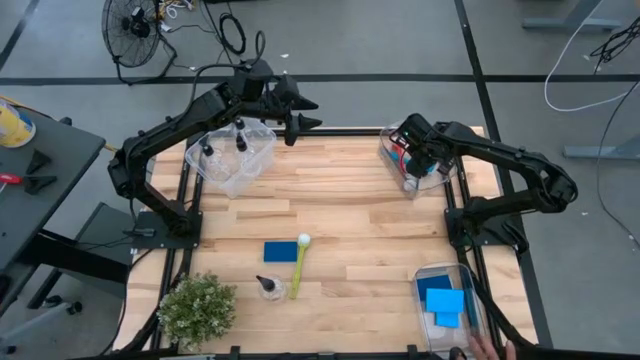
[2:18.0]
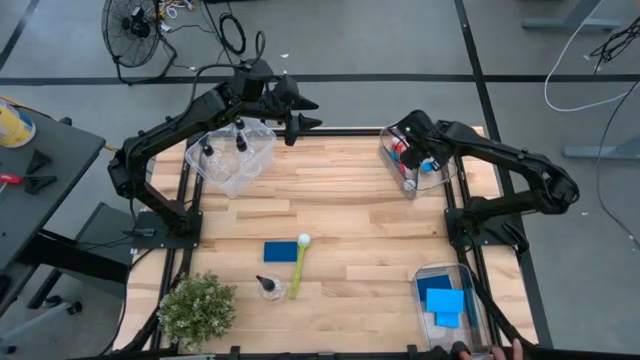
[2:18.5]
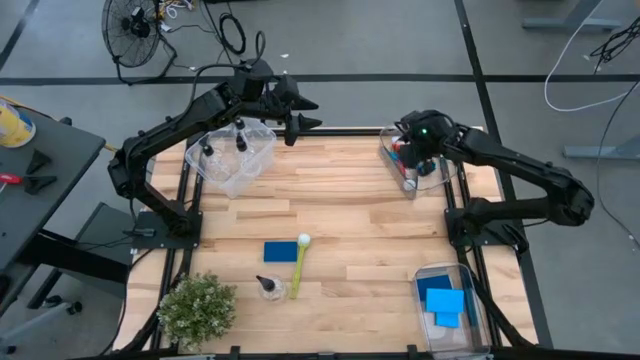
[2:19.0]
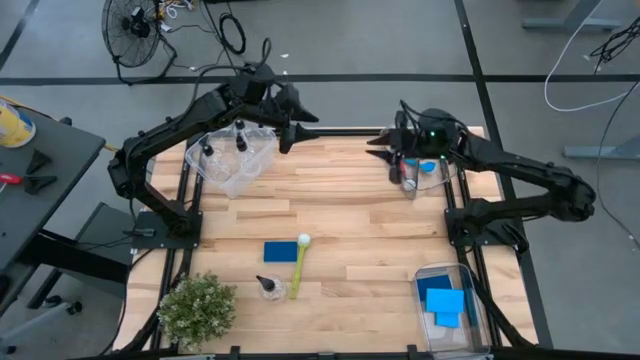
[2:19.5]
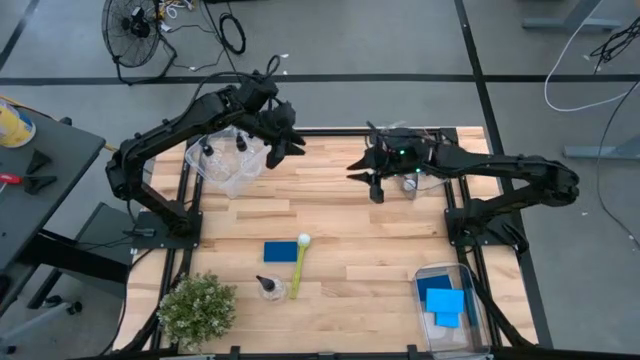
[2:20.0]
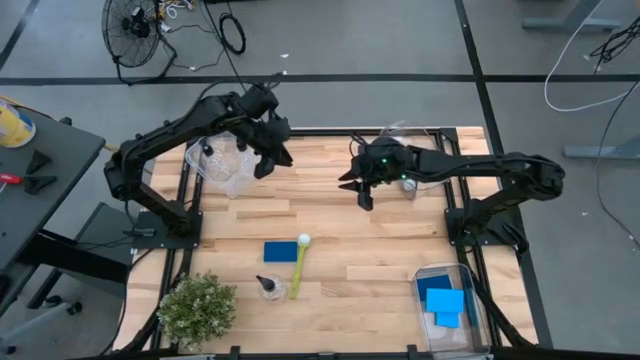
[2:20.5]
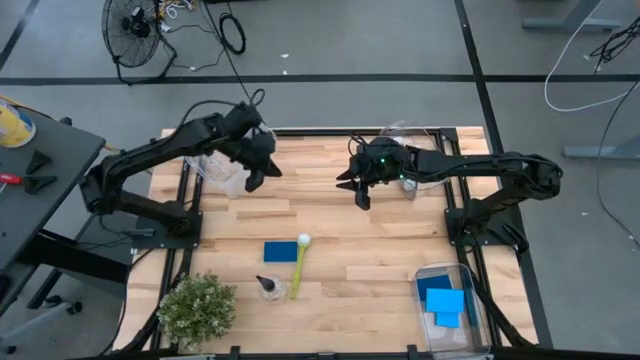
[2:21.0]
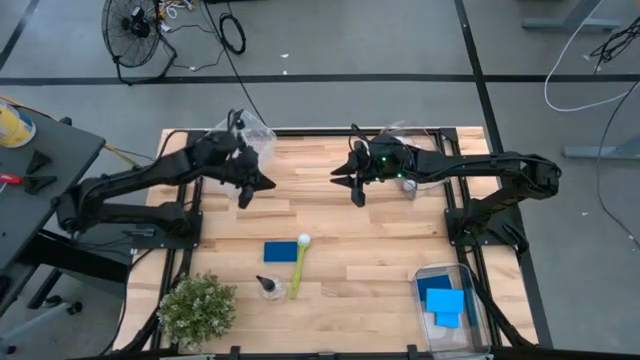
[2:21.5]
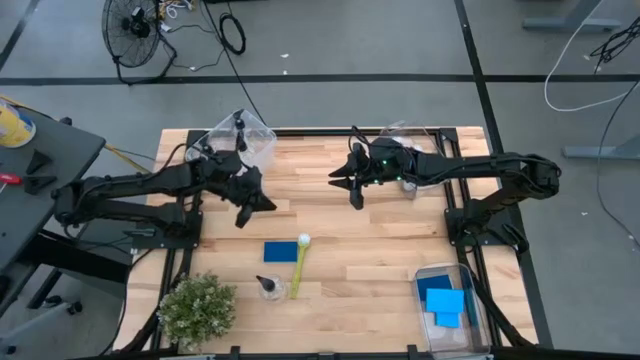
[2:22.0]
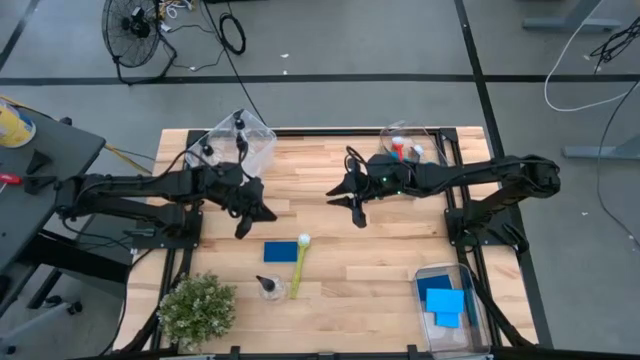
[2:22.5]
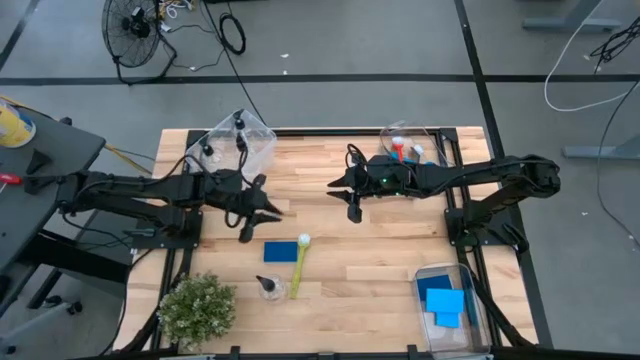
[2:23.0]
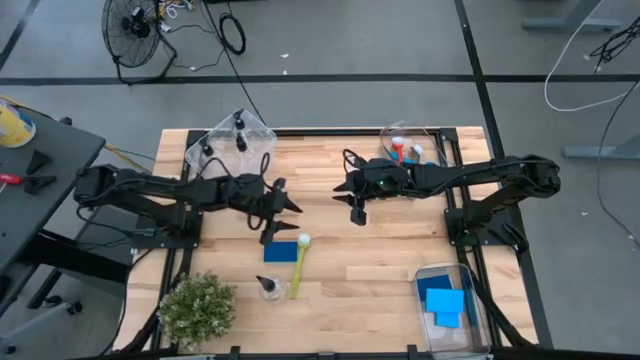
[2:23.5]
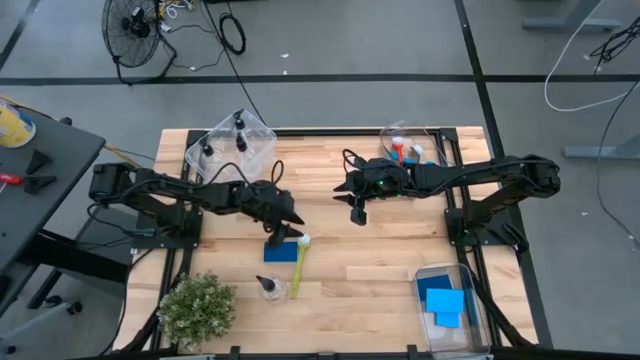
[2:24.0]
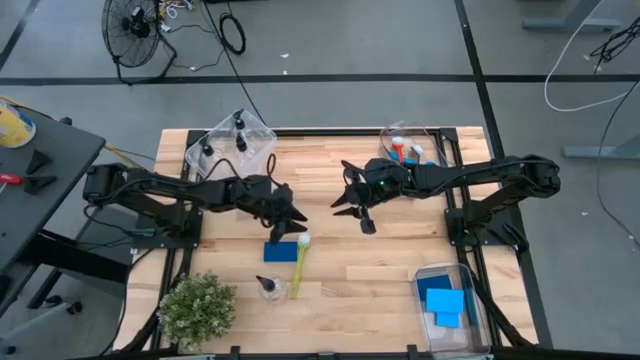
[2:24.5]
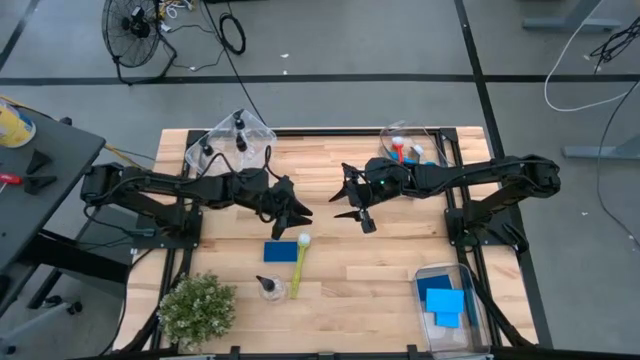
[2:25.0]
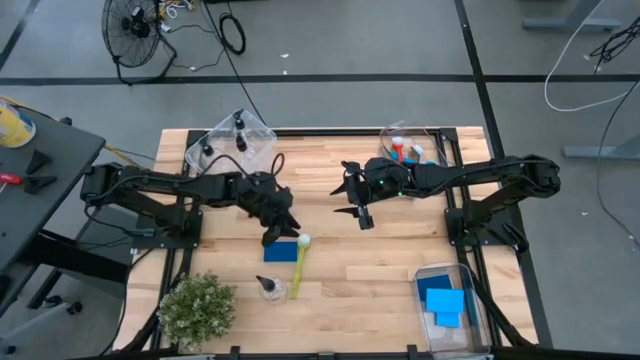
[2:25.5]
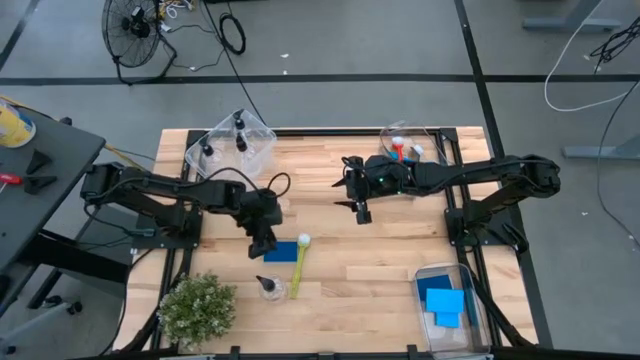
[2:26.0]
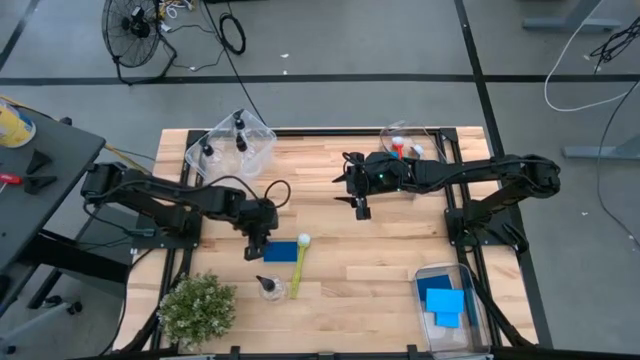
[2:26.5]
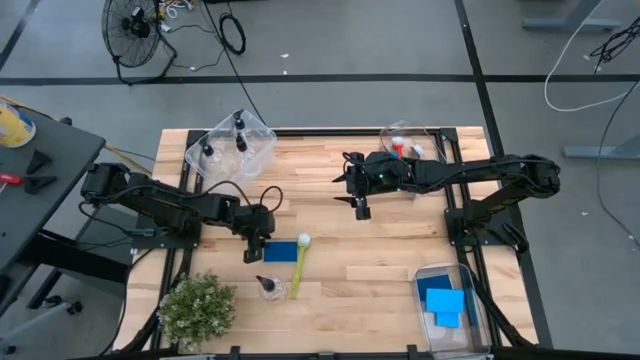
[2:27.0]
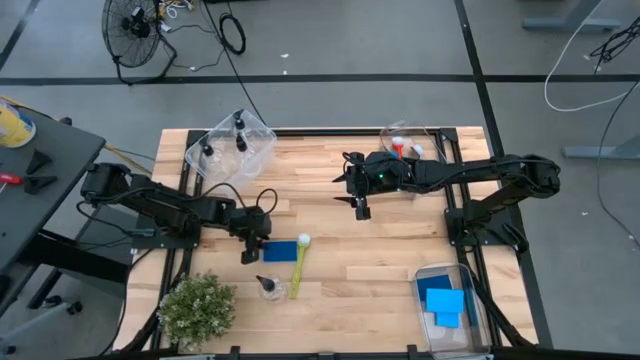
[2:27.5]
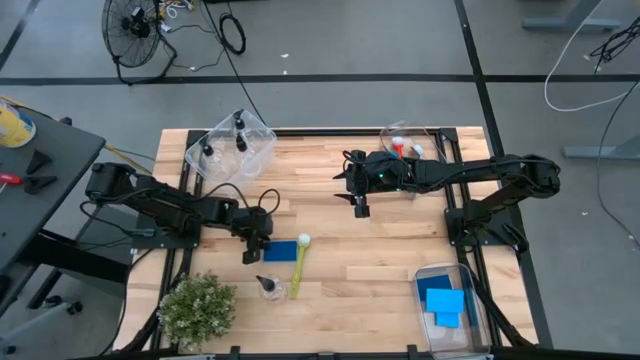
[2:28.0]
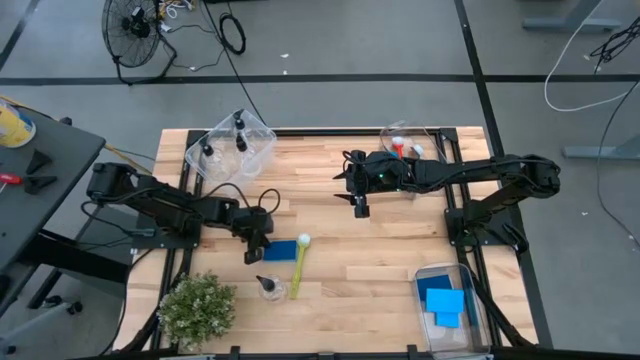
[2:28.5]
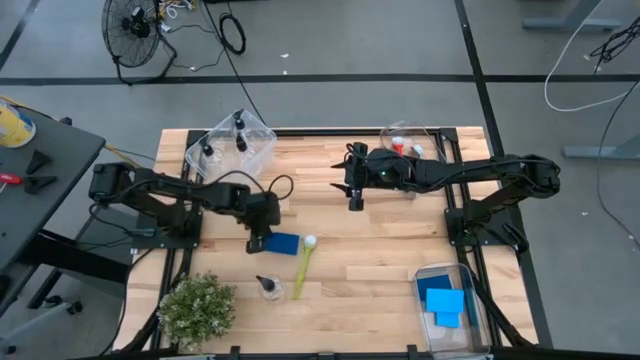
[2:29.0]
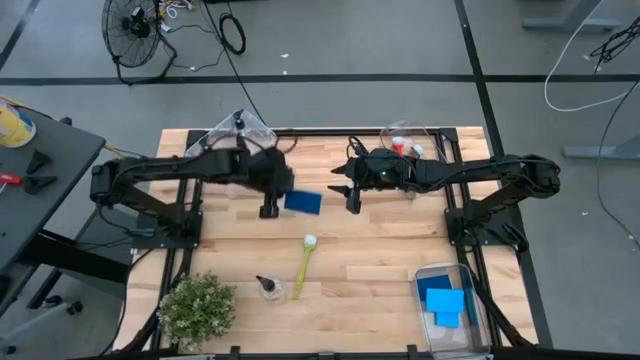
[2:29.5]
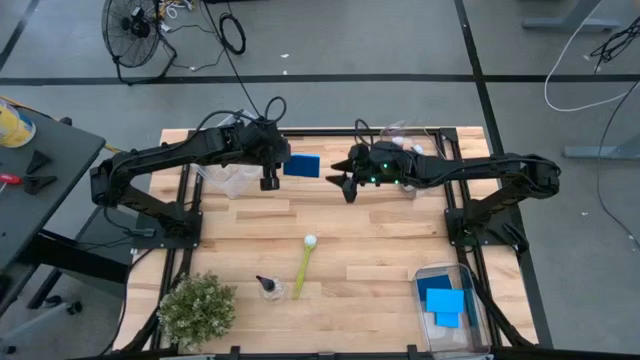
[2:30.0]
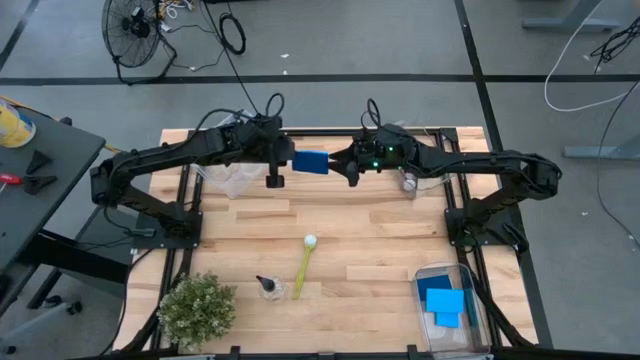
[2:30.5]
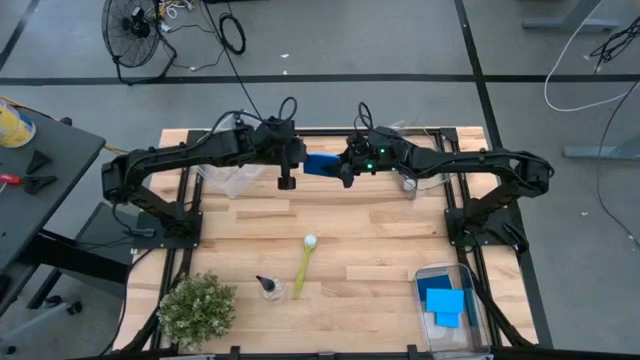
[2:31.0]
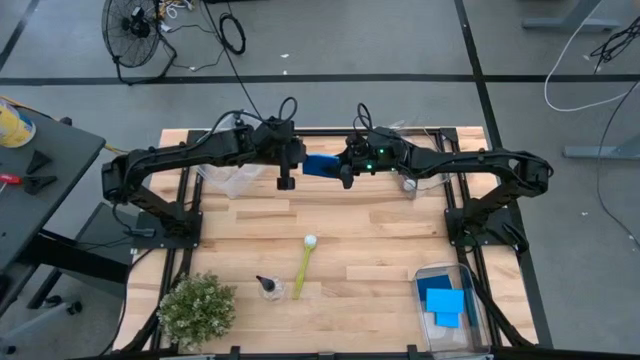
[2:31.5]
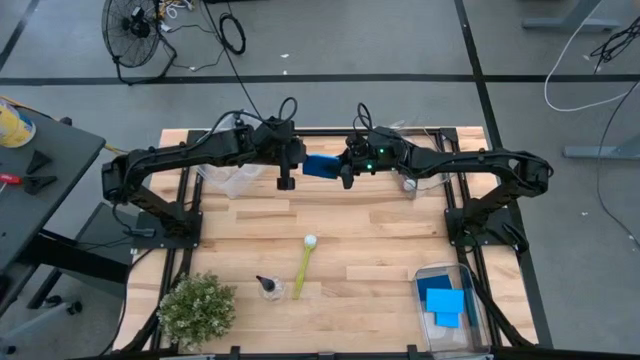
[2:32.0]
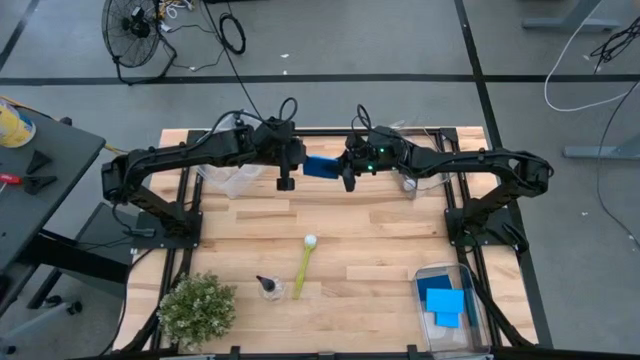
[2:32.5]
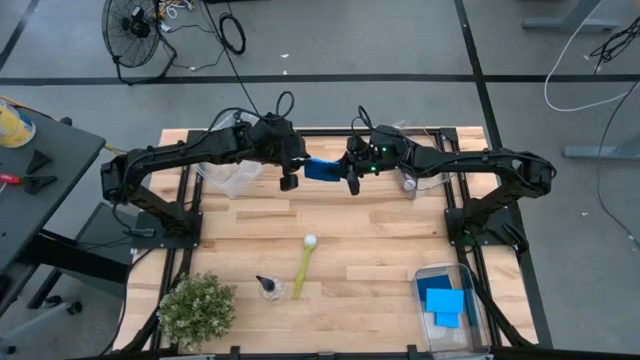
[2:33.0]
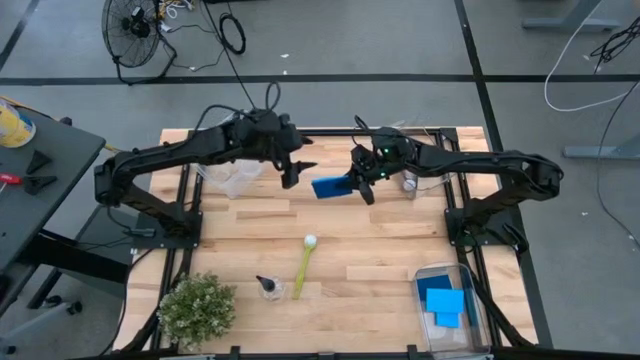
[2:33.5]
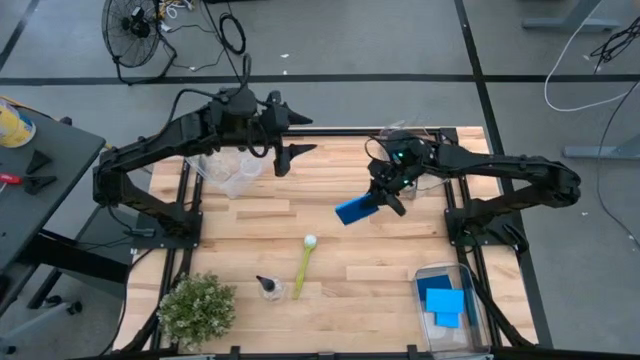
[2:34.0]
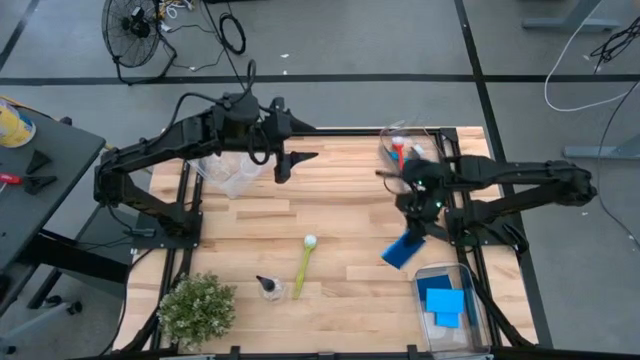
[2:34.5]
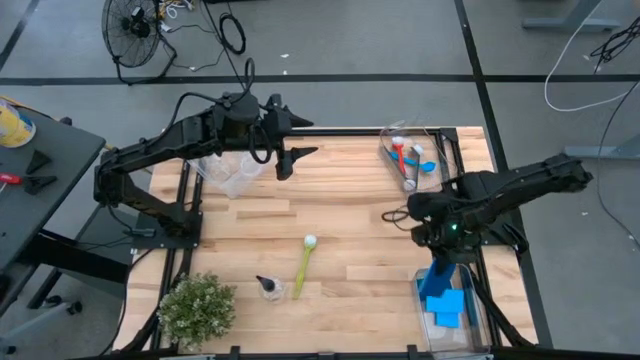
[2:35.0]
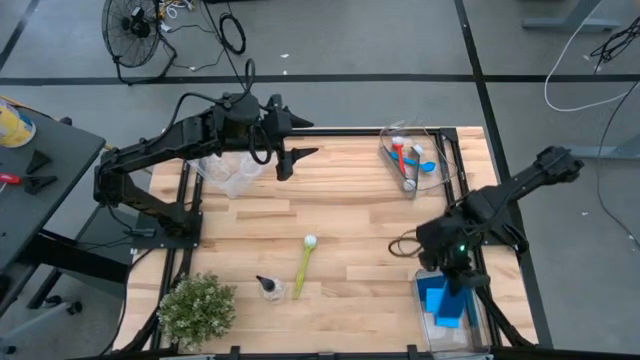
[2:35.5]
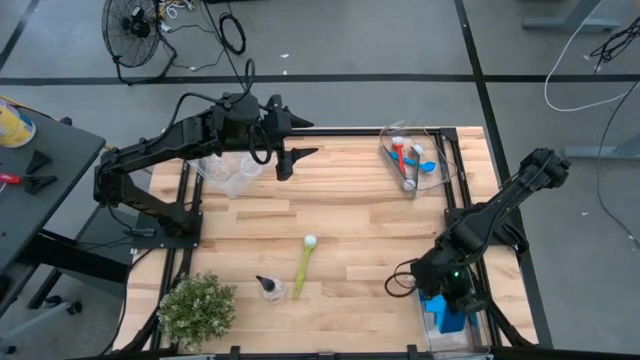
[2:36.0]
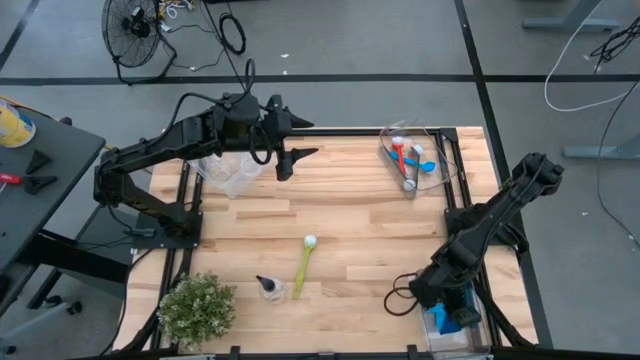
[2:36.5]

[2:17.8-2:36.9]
Task: Pick & Place Kitchen Sink Supplies
Put the blue sponge into the bottom transparent bin

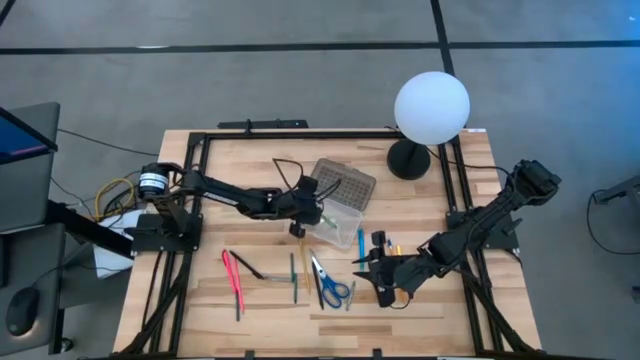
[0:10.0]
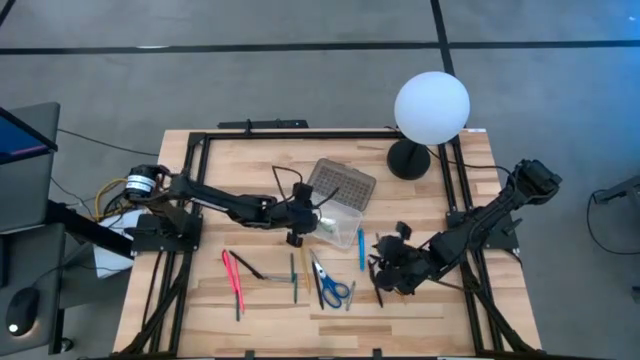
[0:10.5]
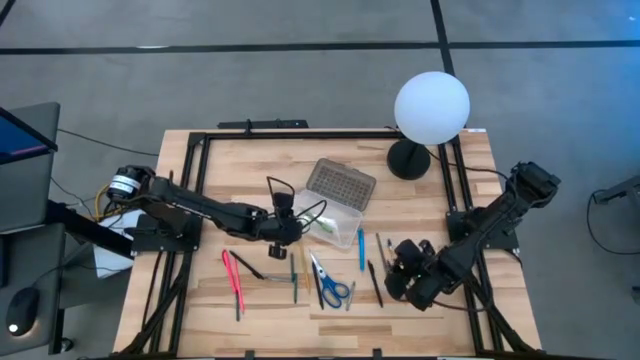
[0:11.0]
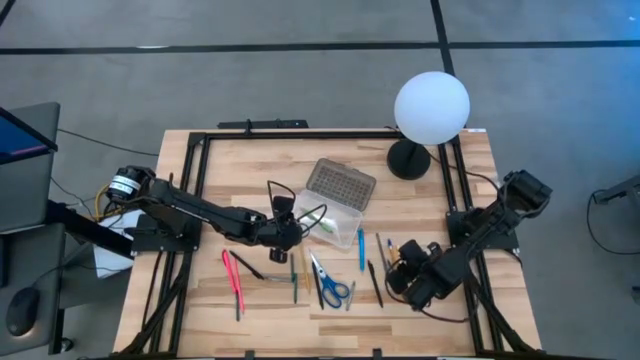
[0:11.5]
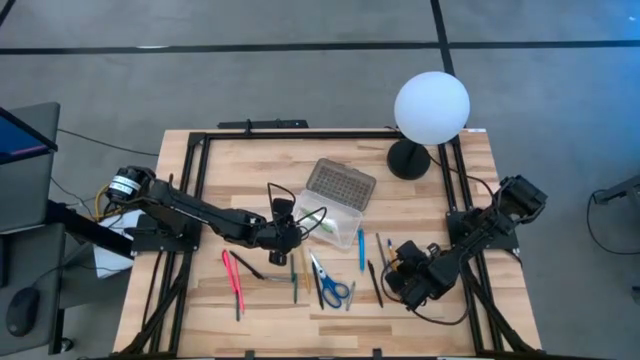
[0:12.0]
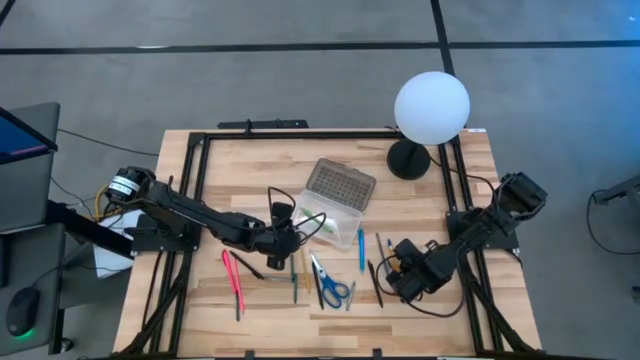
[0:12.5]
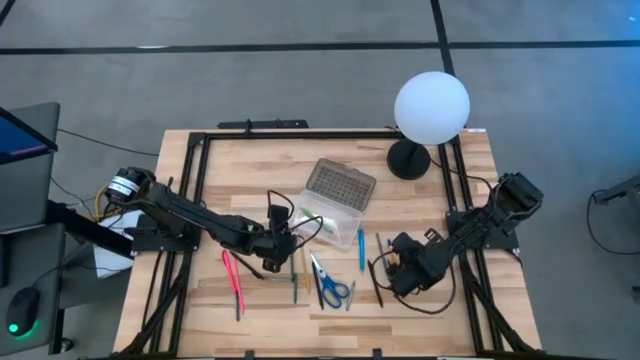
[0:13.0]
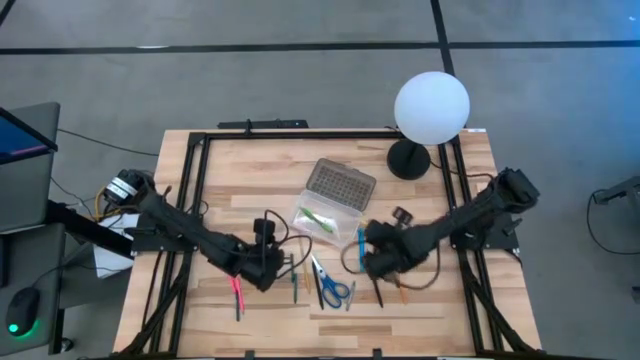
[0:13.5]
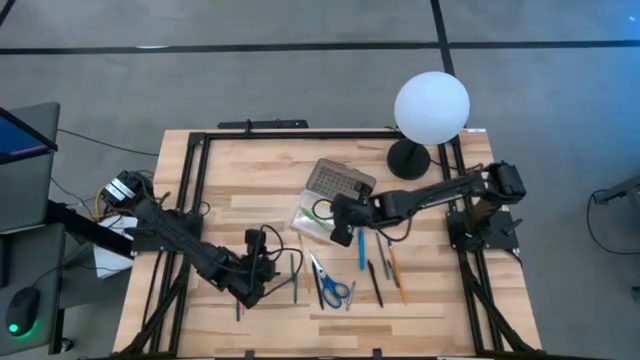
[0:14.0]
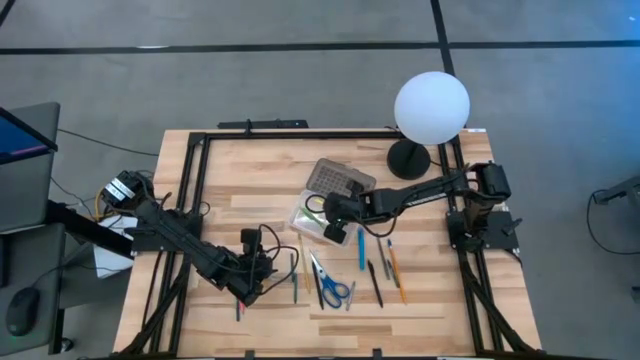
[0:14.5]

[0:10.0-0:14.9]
Task: Pick & place school supplies into a supply box
Put the yellow pen into the gray supply box
